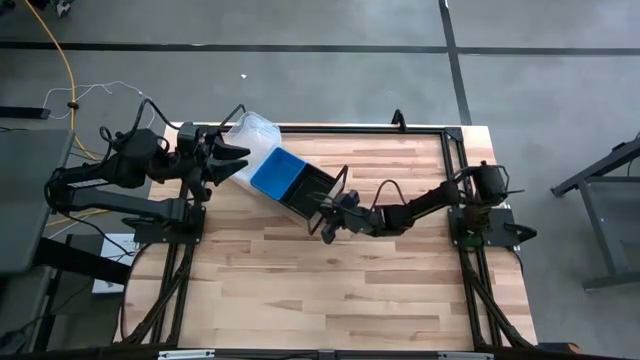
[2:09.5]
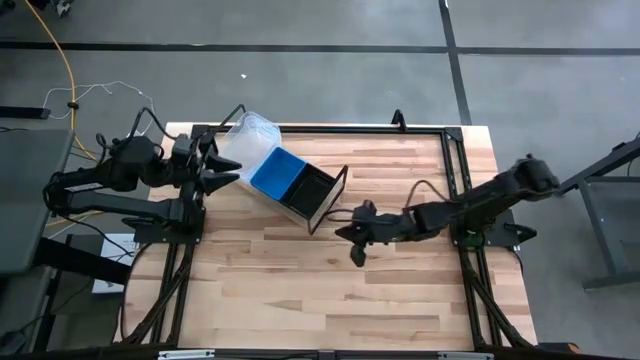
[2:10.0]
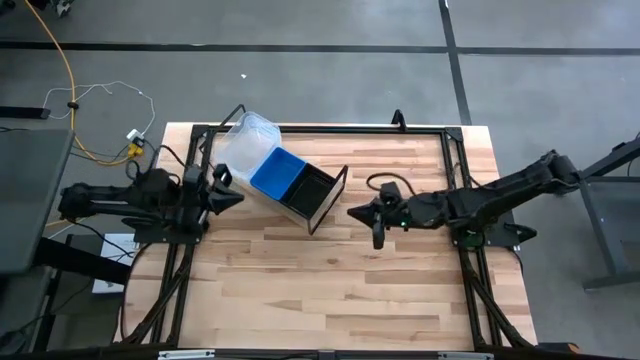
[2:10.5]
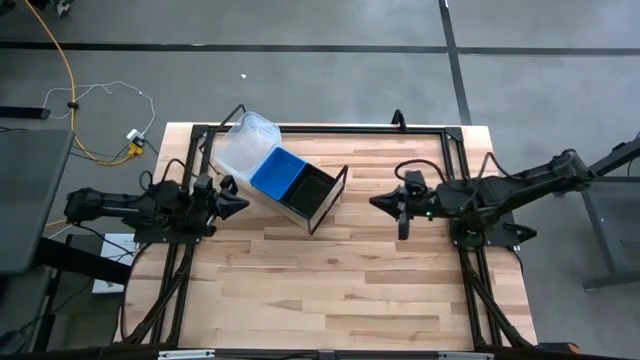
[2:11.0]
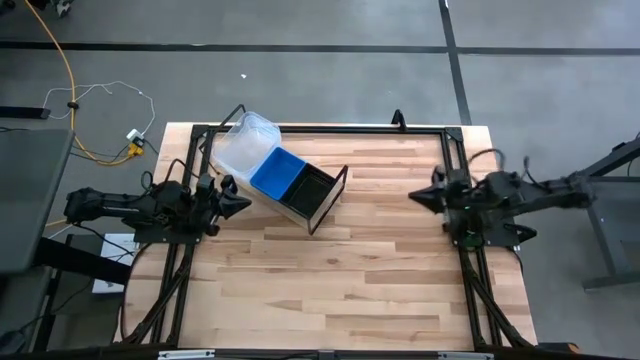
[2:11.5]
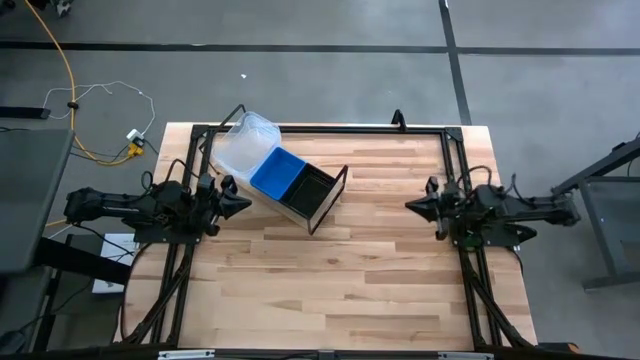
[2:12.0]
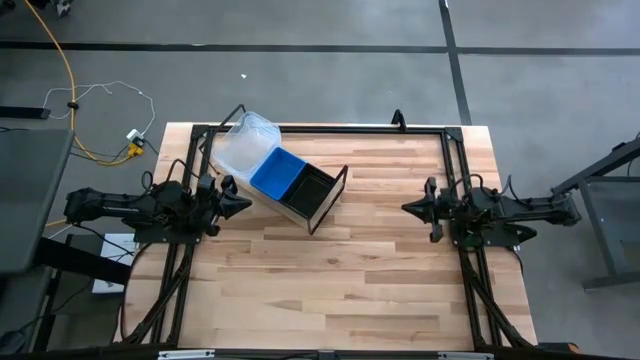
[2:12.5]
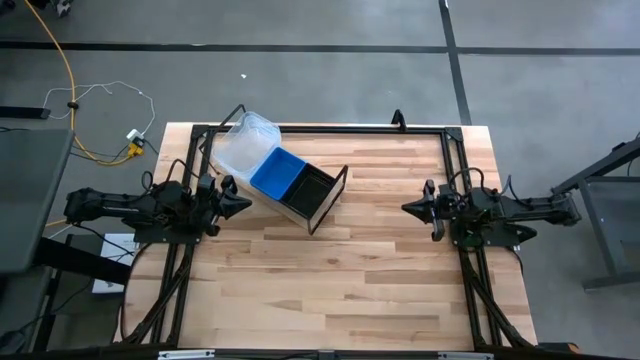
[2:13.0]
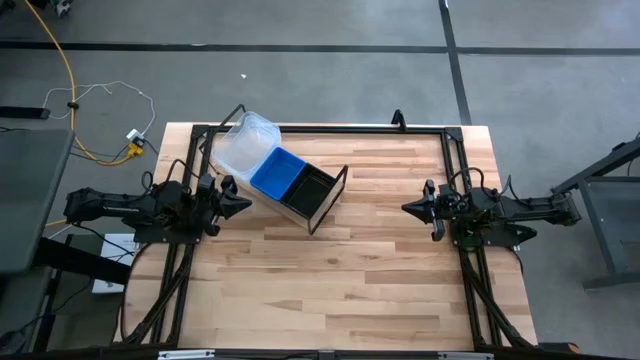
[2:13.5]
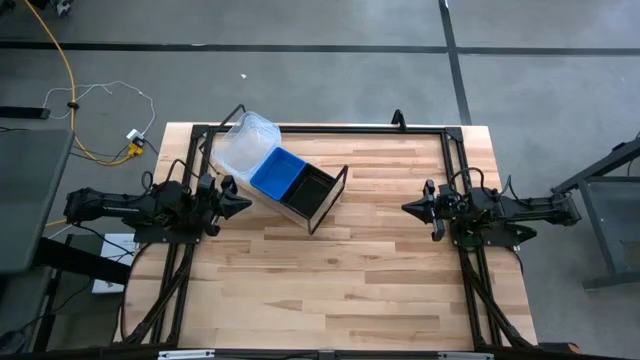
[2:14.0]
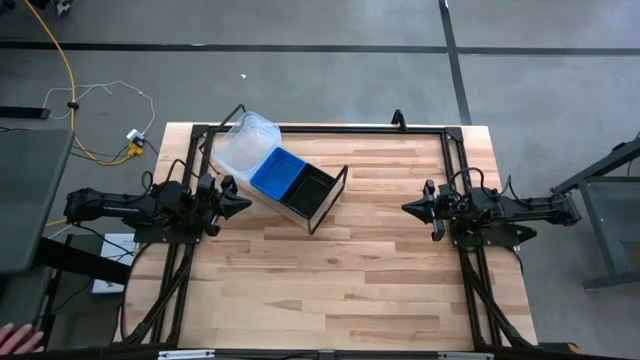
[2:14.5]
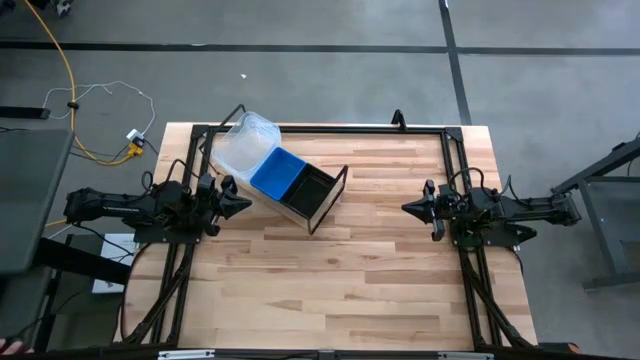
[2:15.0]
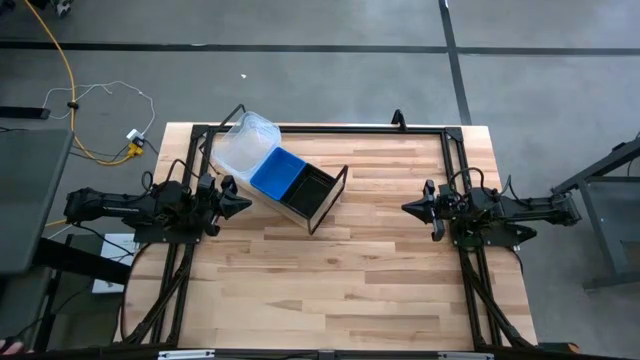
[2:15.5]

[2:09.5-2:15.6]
Task: Stack baskets on shelf by color
Return to Home Position

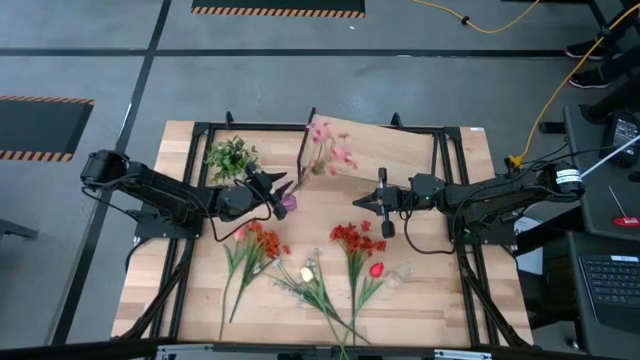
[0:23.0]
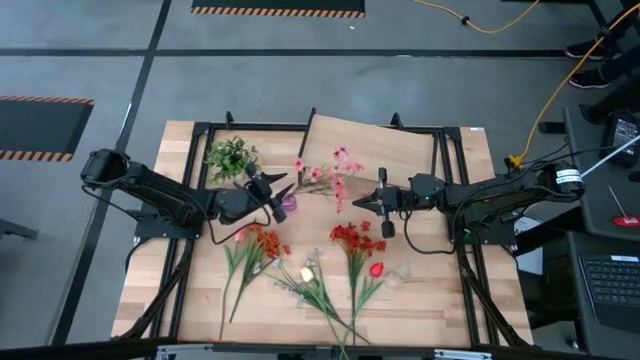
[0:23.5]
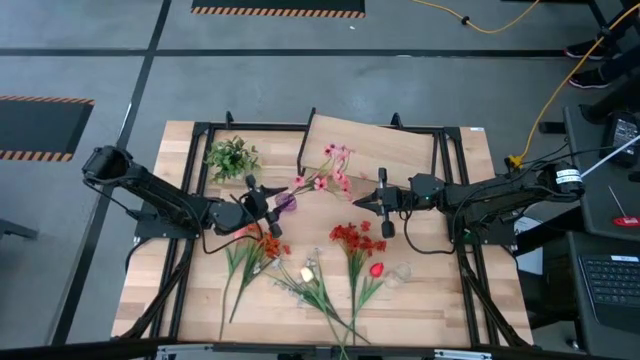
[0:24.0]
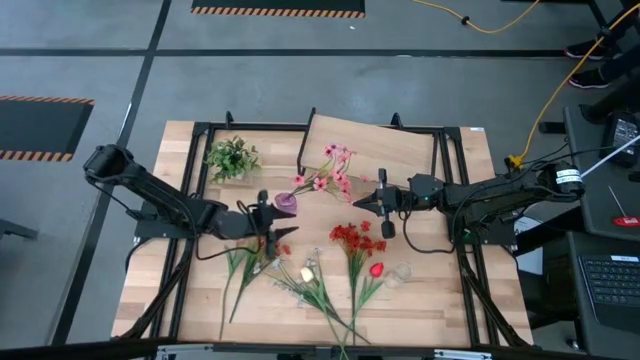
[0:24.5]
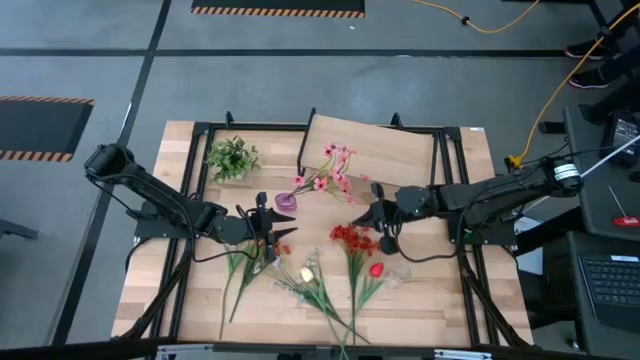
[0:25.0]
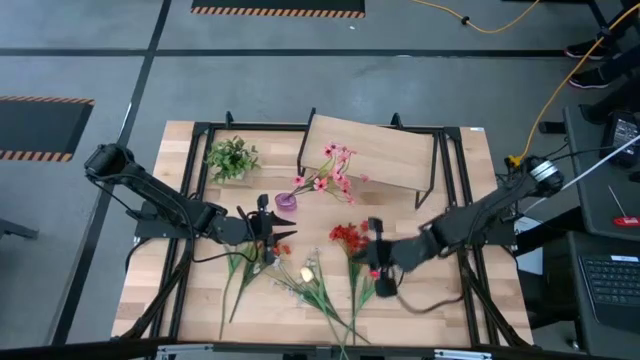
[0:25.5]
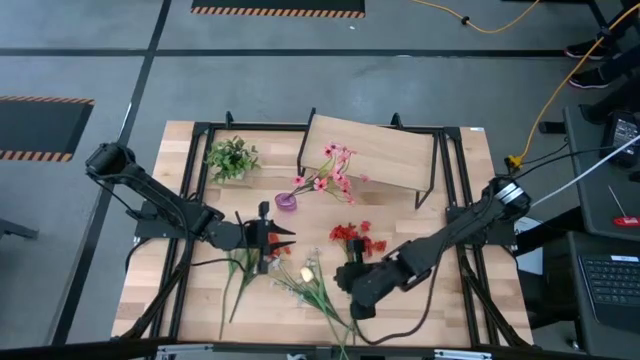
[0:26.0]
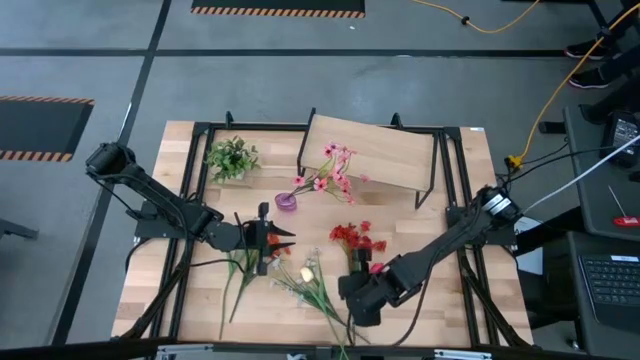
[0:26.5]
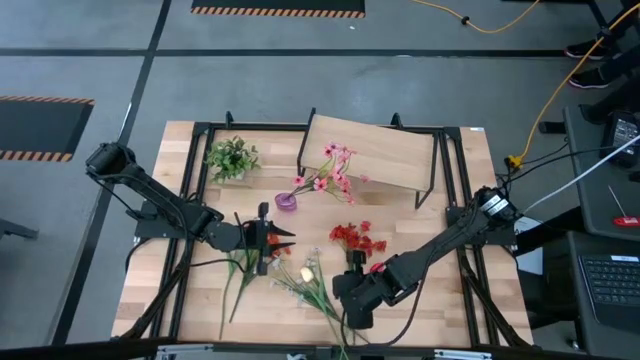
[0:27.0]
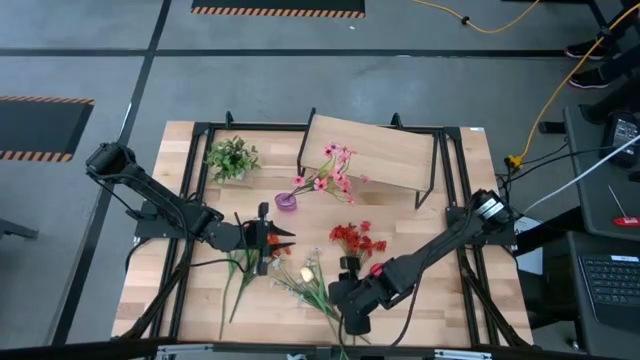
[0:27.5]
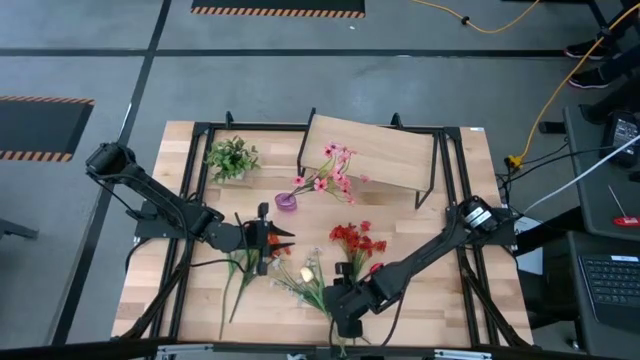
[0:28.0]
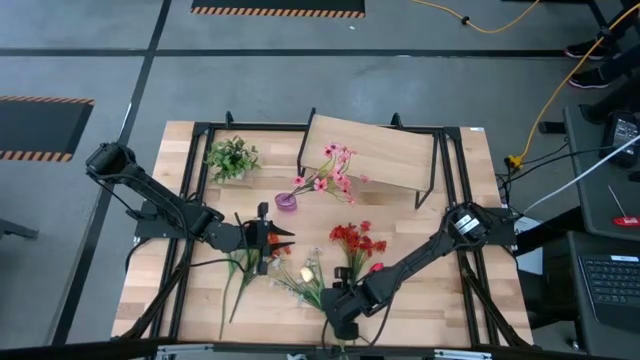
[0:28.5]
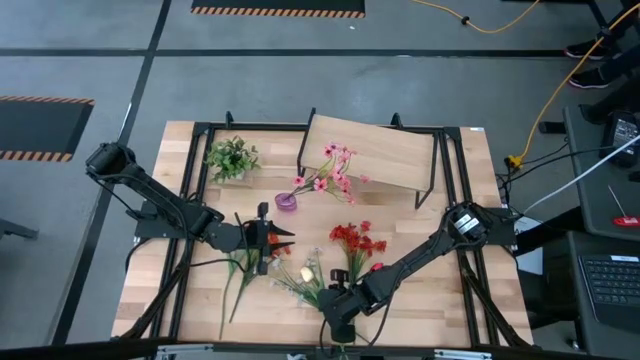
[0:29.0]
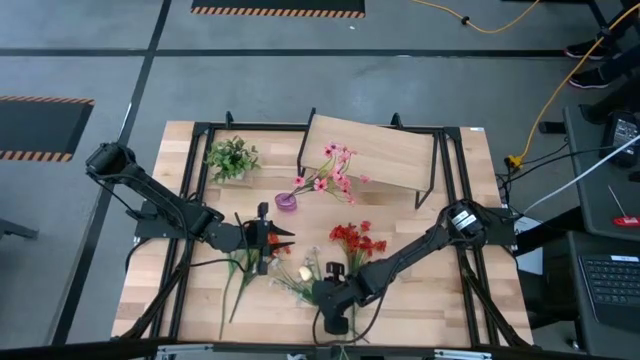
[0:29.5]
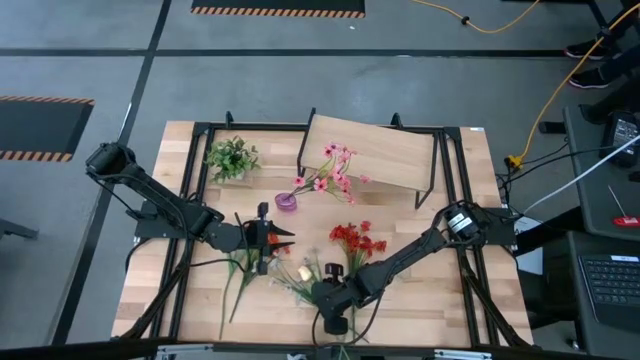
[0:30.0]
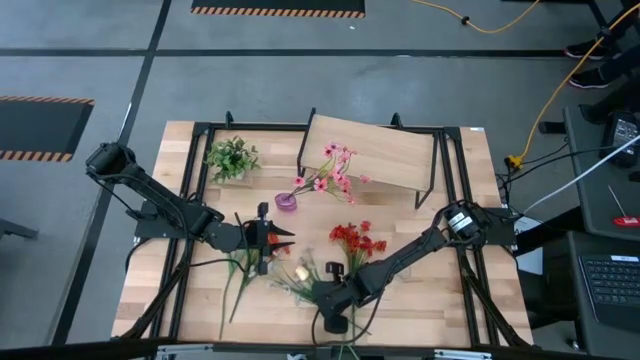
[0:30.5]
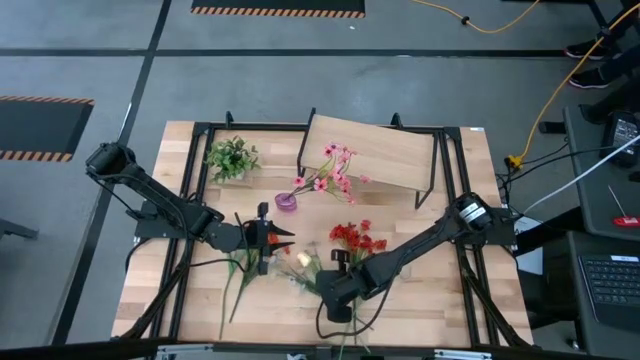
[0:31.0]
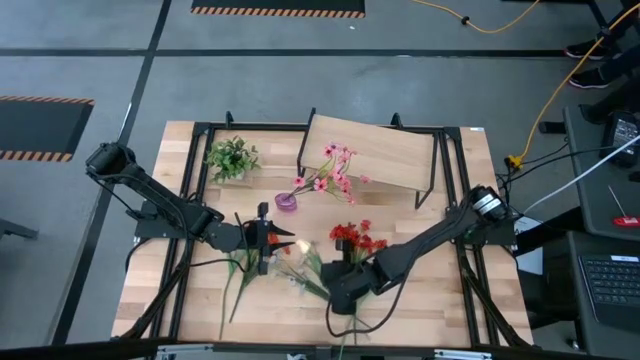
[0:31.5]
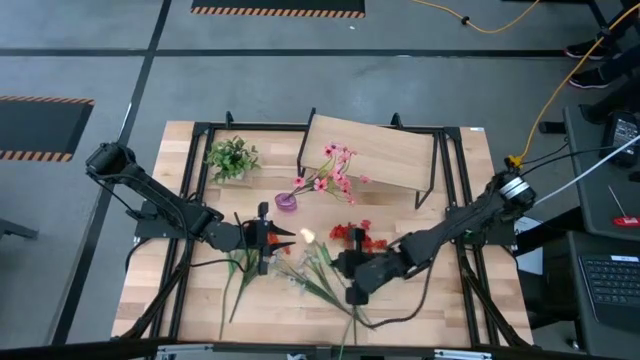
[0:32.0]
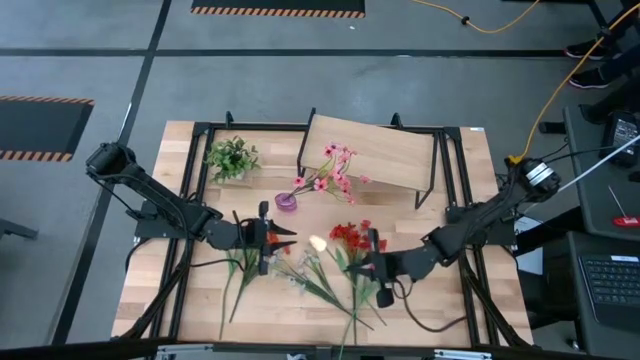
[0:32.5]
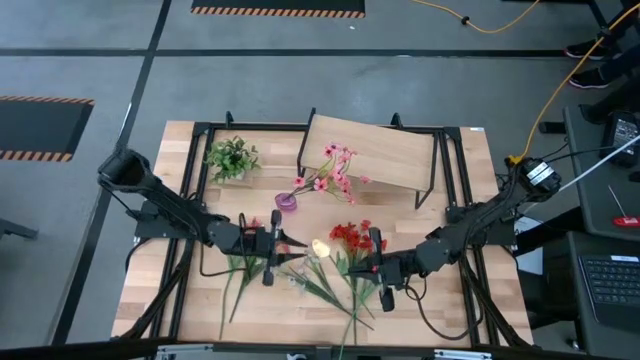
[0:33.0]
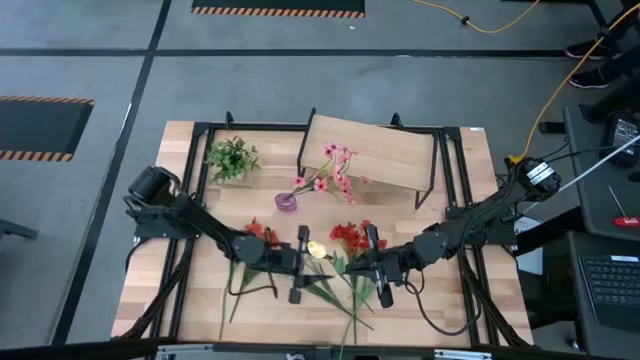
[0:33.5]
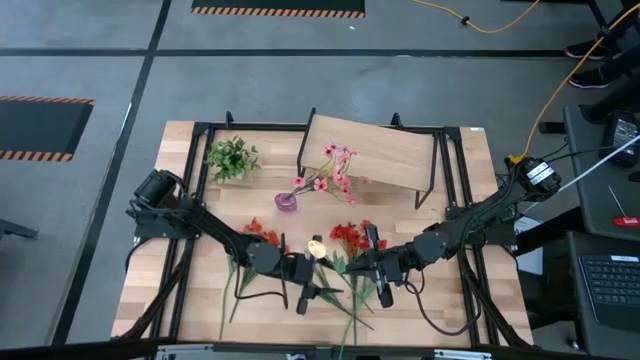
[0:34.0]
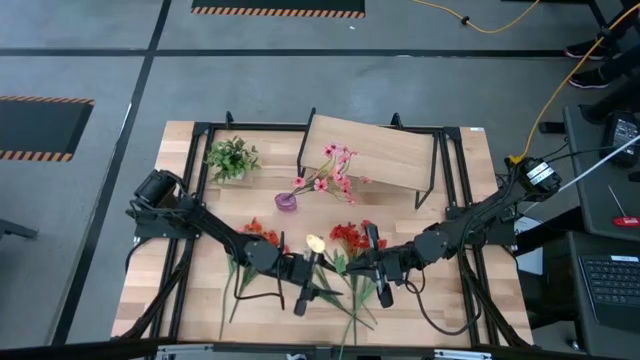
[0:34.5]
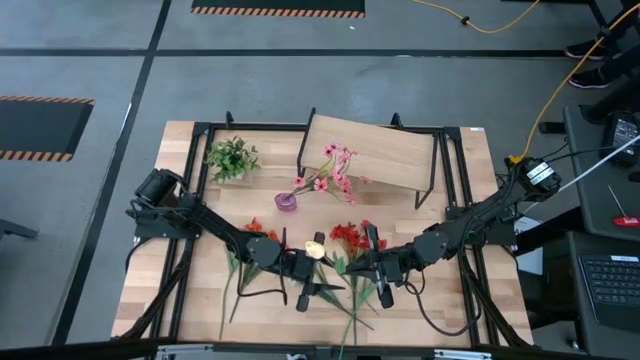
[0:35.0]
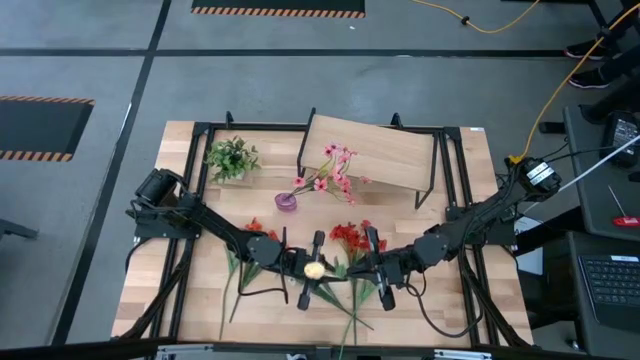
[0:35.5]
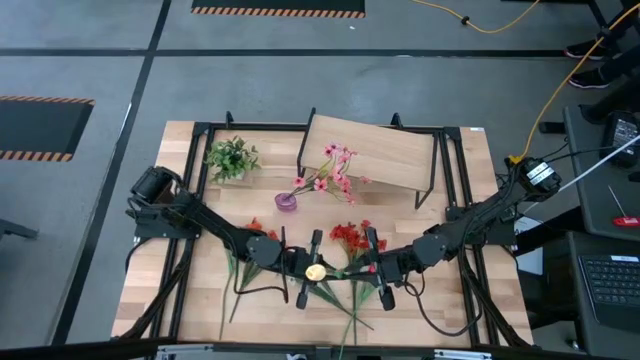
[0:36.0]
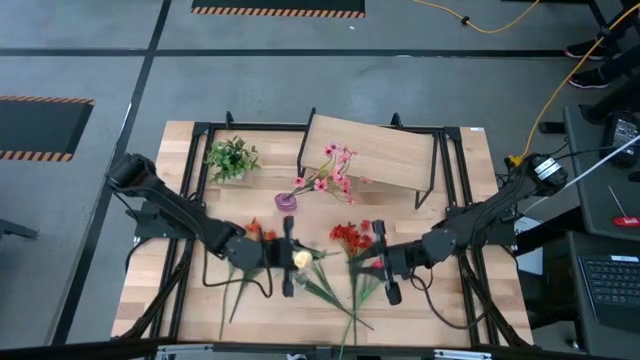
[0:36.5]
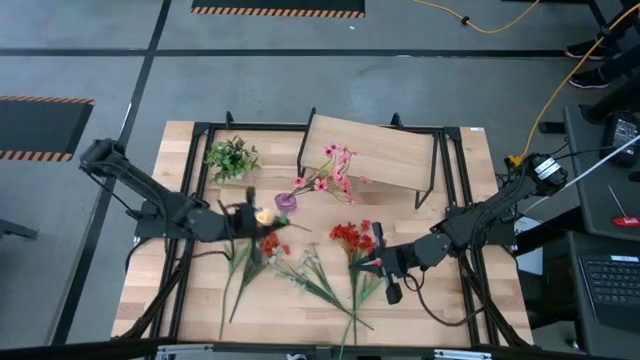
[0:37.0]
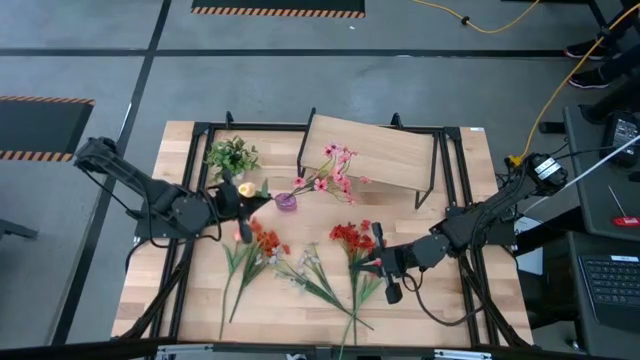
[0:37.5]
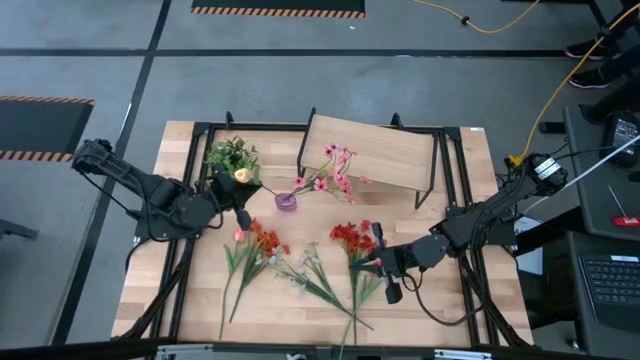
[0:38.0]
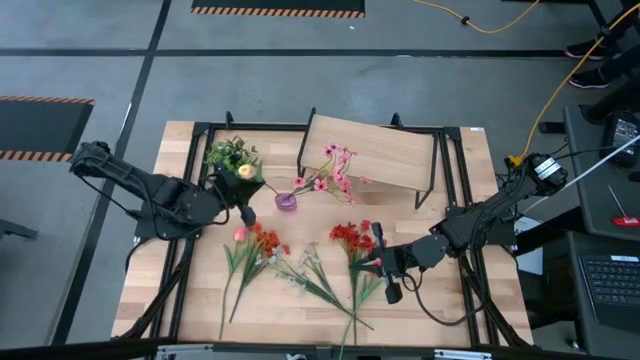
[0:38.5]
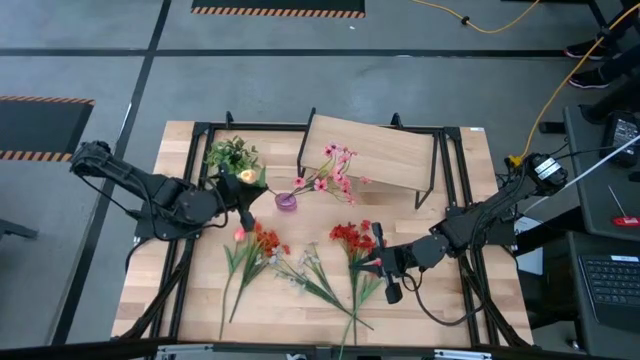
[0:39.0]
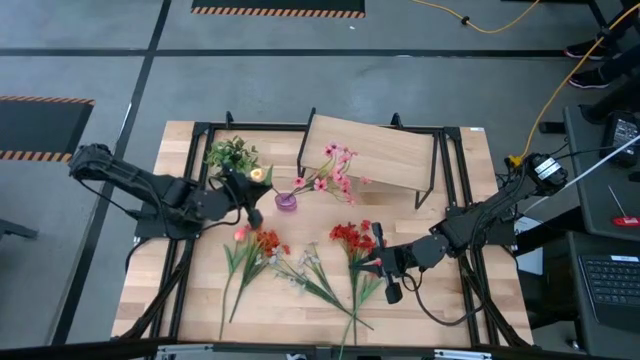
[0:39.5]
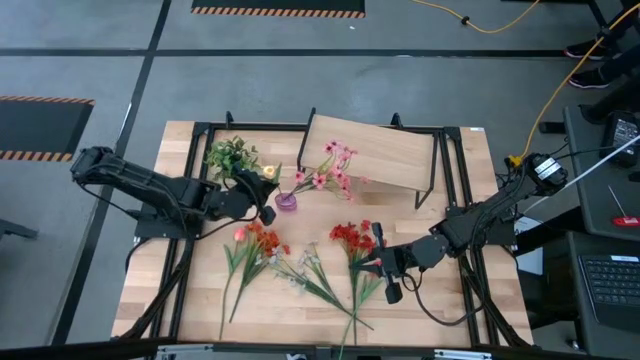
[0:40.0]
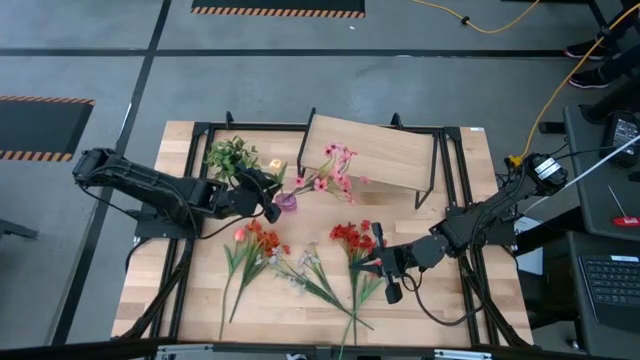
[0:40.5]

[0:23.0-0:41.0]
Task: Pick and place flowers into a vace then onto a shelf
Put the yellow flower into the purple vase
